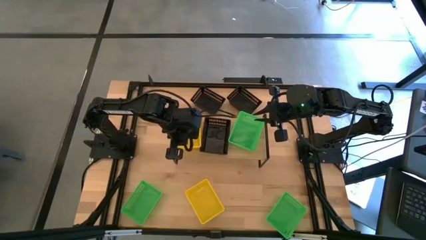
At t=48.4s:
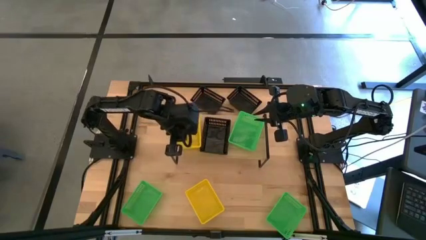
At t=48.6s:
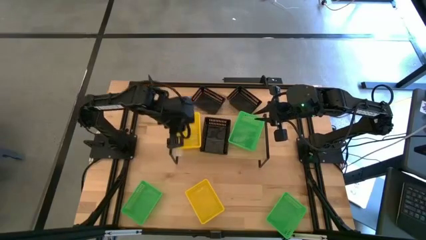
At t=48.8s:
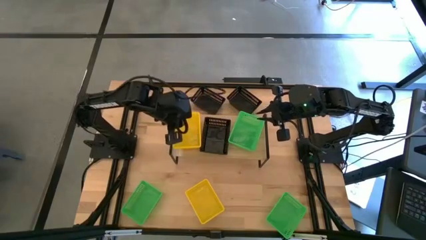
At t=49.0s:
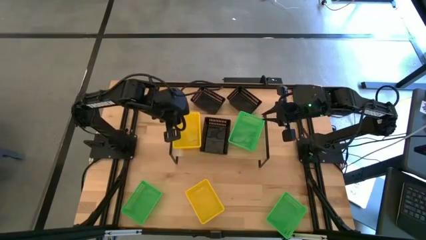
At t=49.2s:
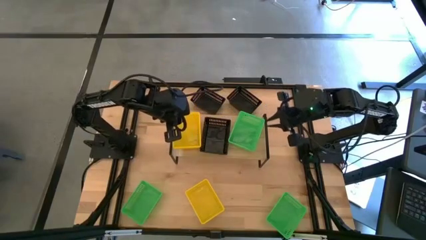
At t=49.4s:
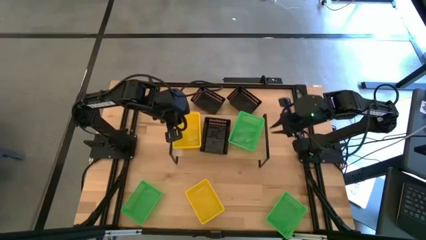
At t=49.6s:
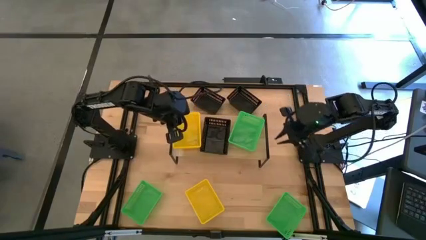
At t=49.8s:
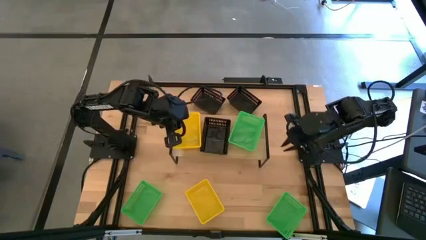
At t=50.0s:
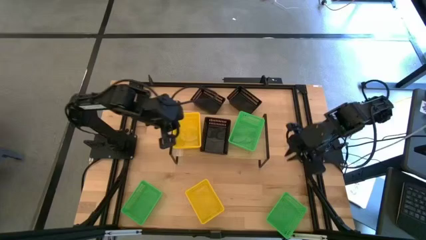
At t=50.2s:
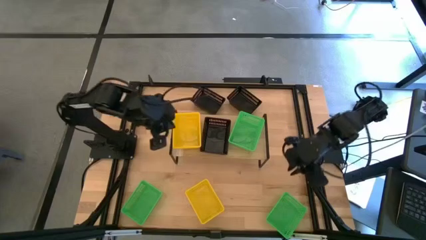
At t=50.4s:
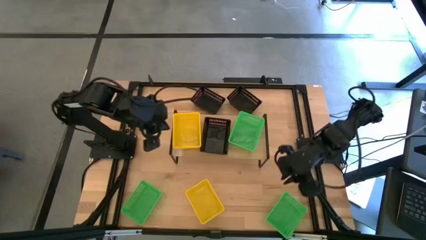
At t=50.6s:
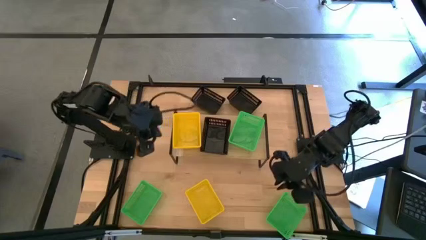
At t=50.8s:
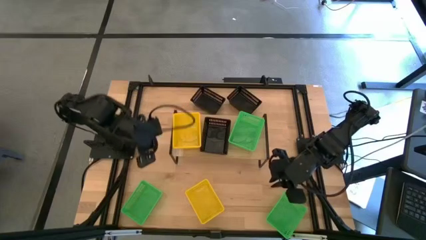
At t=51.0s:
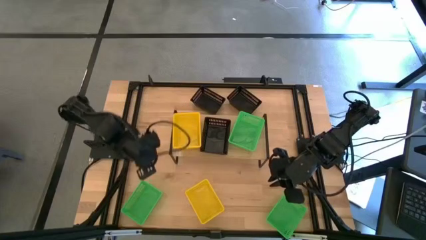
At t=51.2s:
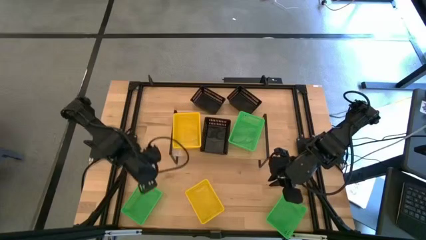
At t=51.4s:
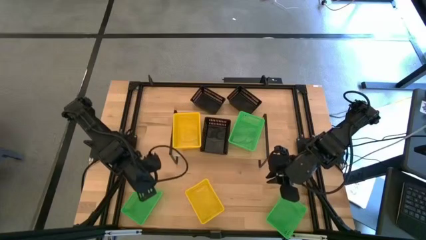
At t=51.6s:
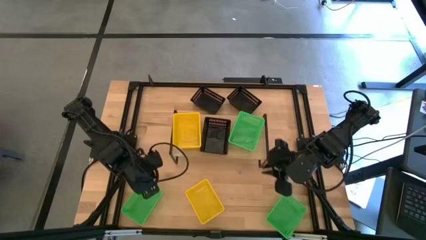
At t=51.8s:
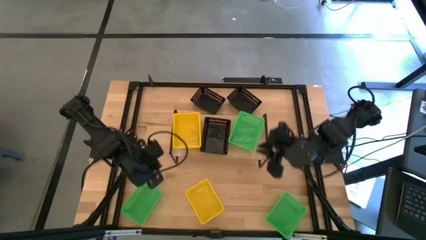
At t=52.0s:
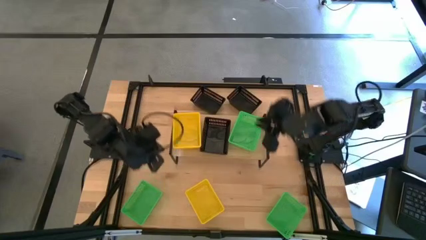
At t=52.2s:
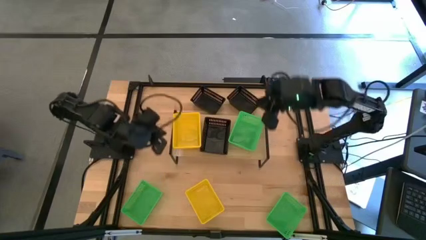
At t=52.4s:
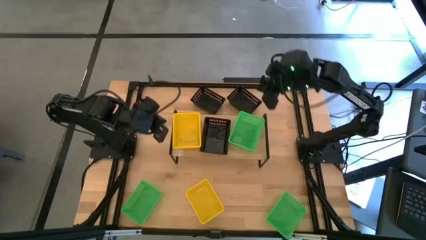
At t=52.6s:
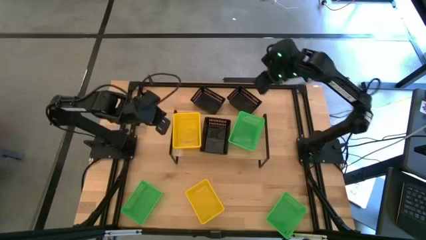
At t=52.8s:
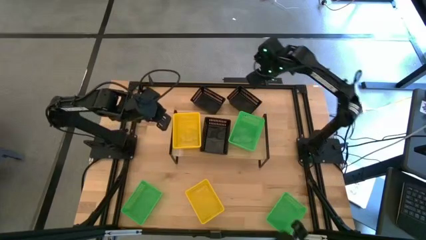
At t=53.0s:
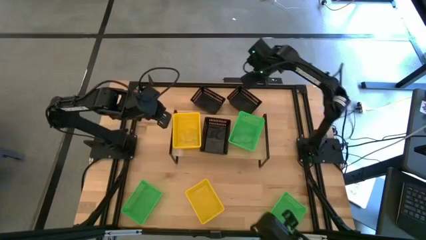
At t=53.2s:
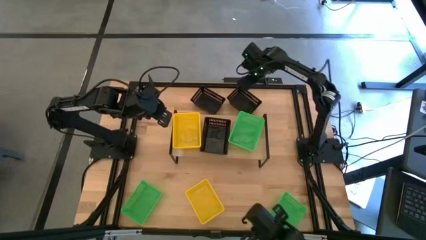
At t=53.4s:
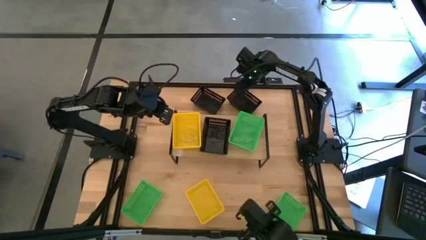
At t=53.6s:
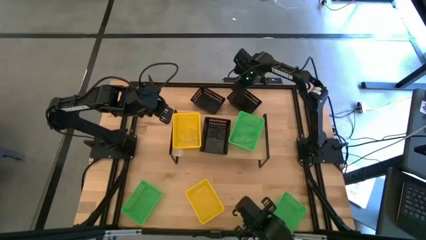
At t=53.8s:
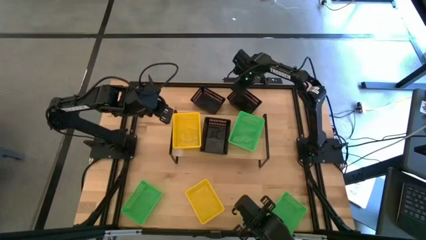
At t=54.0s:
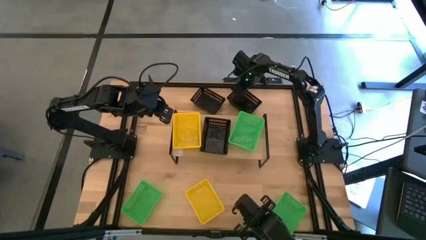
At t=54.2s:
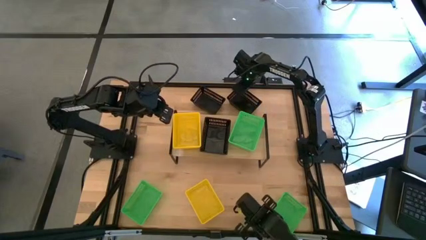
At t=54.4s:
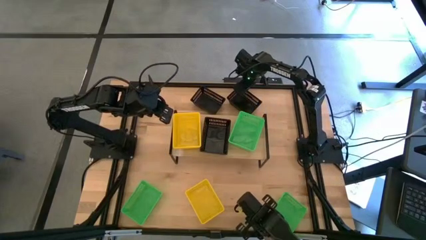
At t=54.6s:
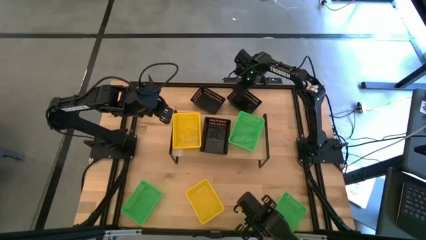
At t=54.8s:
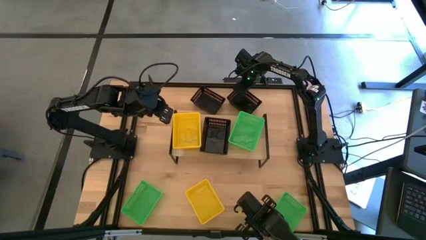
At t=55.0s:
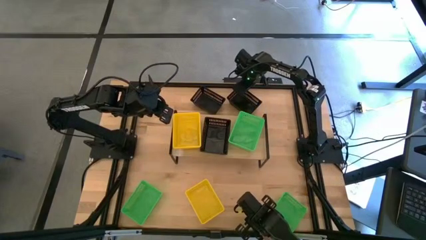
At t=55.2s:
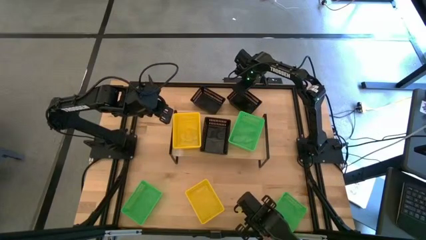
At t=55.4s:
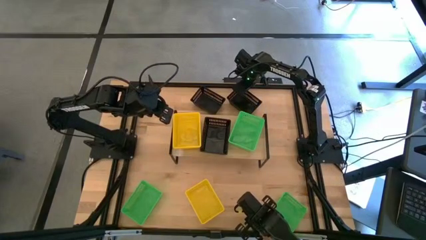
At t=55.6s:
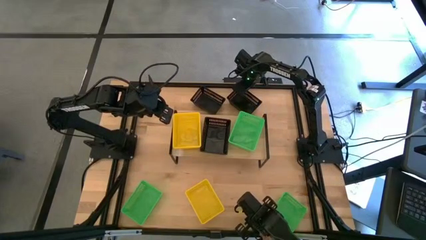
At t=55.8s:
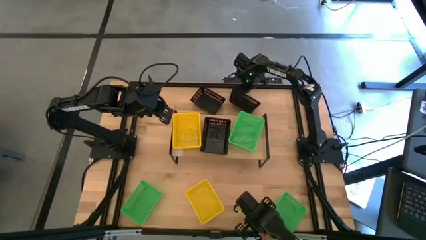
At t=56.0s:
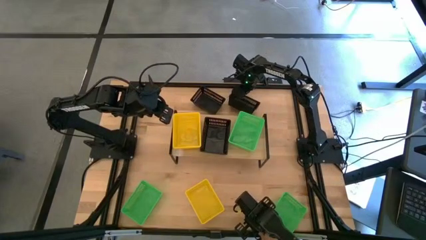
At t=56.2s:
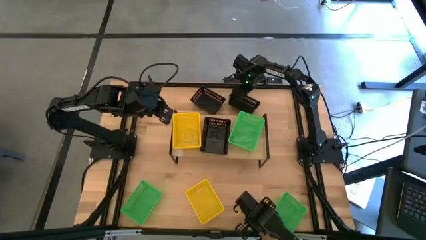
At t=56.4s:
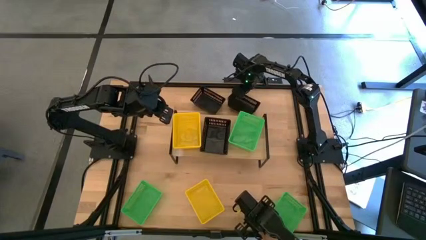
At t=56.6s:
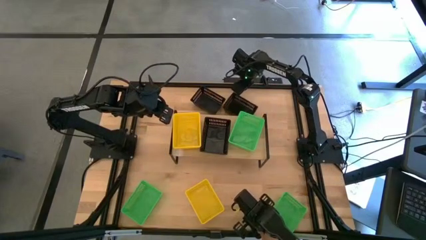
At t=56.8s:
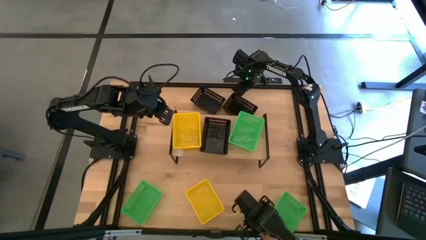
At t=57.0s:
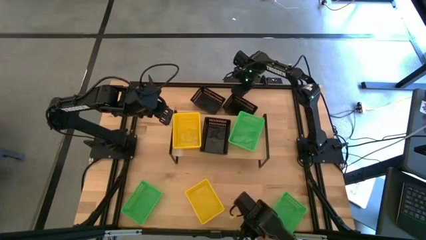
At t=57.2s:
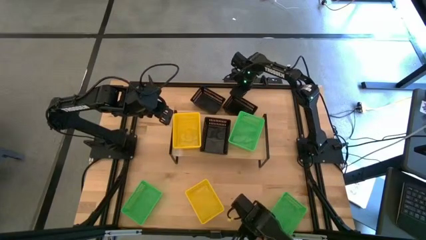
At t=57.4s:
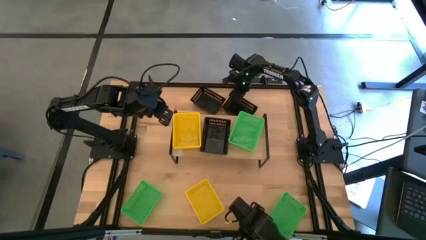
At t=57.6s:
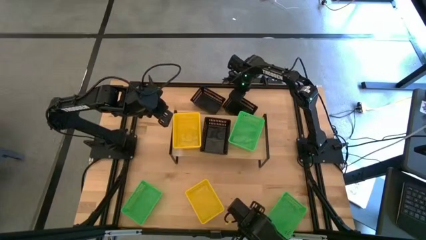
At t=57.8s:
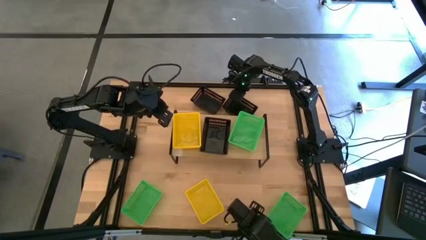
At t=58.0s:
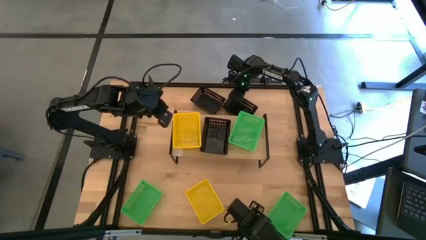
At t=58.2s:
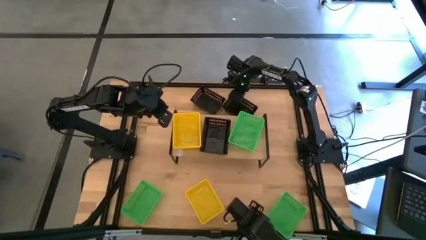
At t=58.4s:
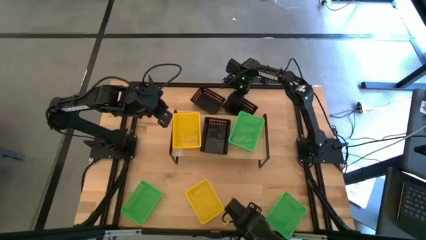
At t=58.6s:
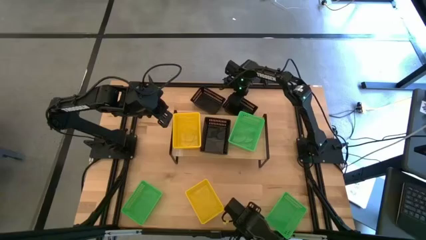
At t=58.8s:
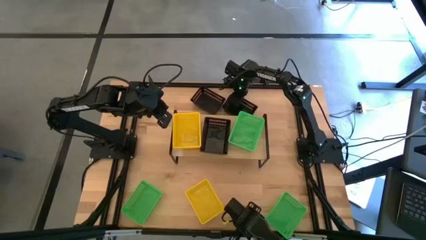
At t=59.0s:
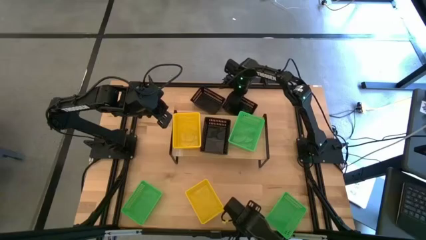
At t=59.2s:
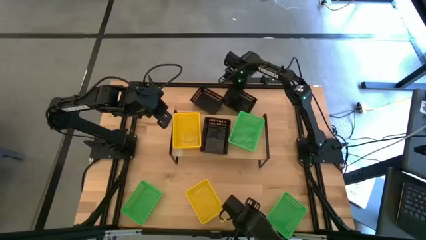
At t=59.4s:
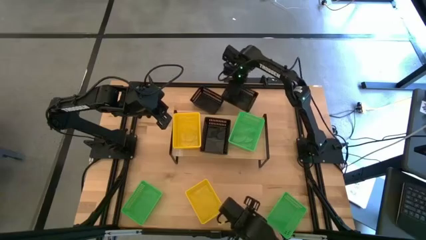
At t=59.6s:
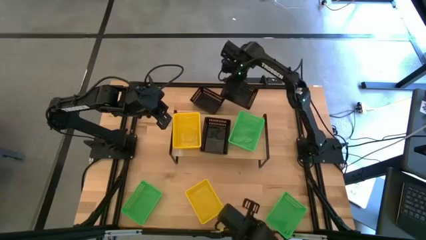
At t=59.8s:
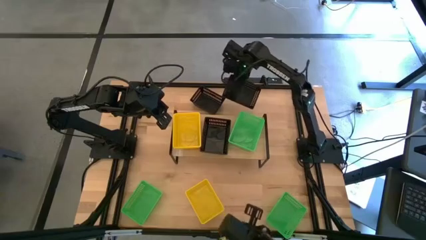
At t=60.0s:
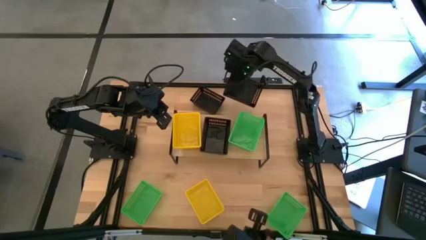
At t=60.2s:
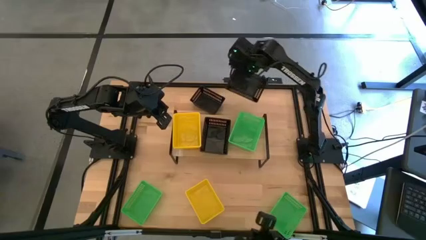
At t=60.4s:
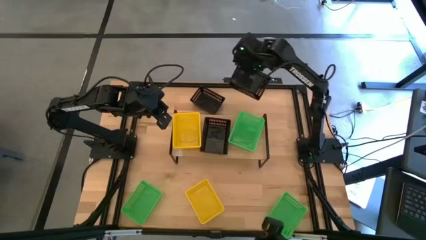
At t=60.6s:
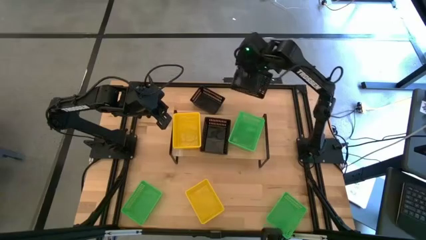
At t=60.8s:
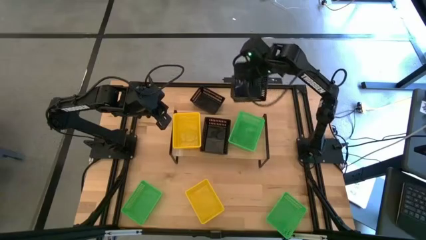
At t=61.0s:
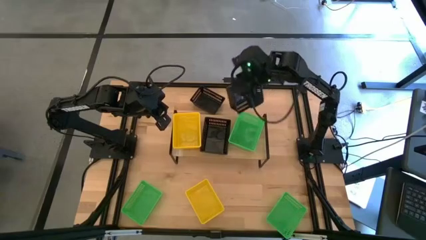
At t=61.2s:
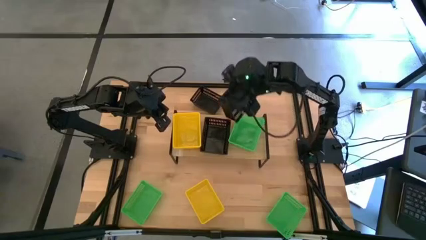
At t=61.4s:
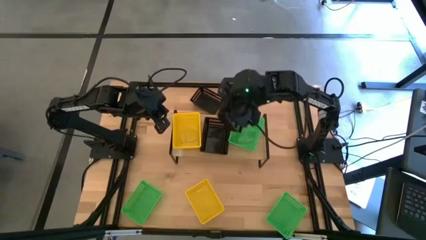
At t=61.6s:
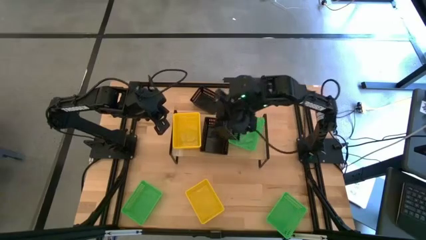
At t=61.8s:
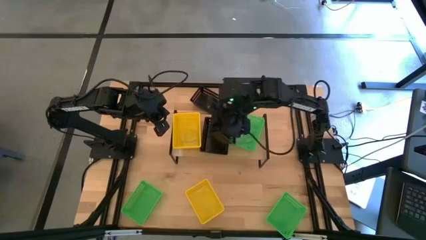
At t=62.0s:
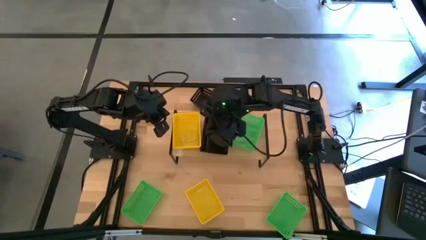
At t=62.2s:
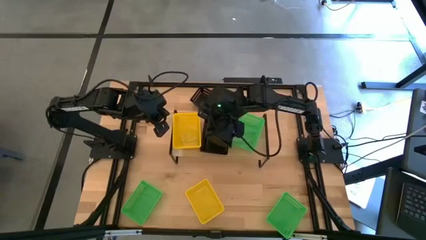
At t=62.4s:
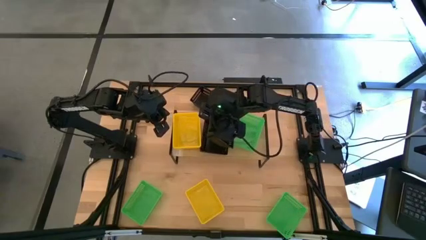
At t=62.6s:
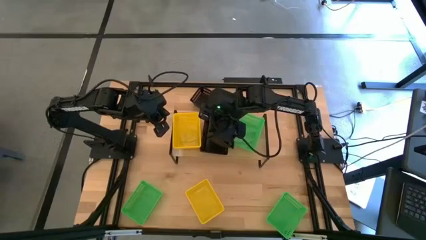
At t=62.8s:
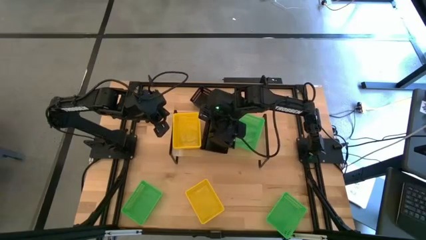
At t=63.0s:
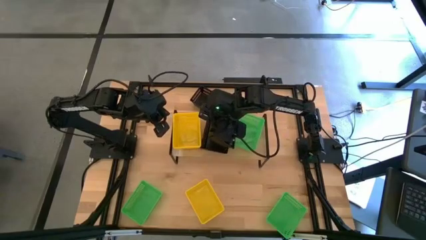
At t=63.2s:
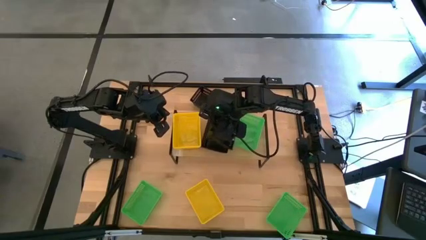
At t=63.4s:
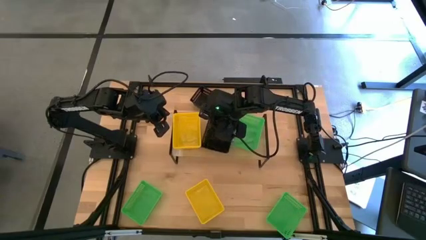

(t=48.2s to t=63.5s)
Task: Stack baskets on shelf by color
Stack the right black bin on the other black bin on the shelf
